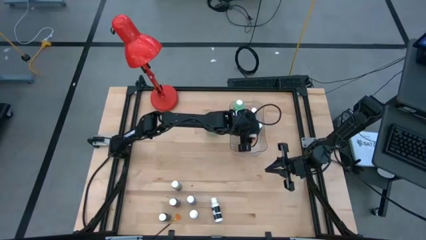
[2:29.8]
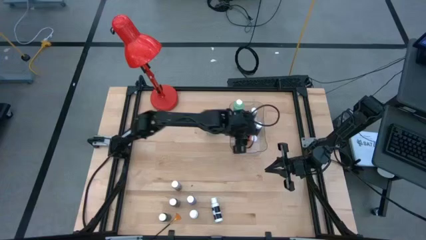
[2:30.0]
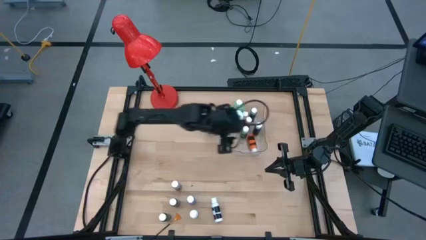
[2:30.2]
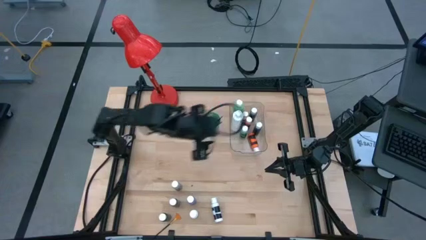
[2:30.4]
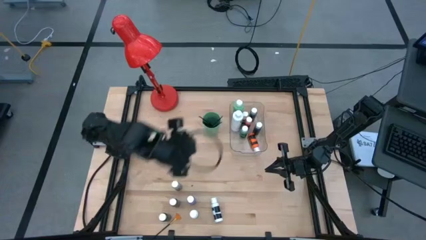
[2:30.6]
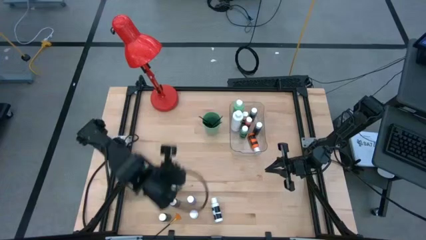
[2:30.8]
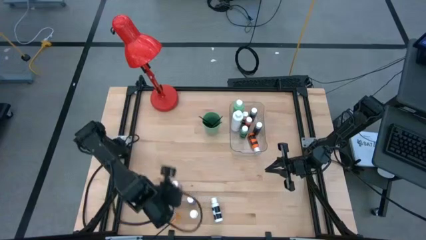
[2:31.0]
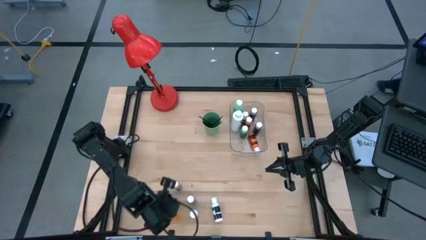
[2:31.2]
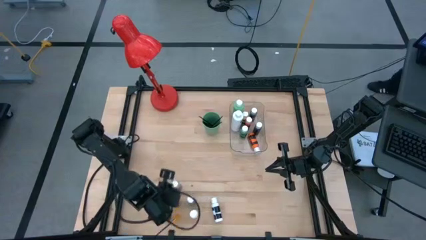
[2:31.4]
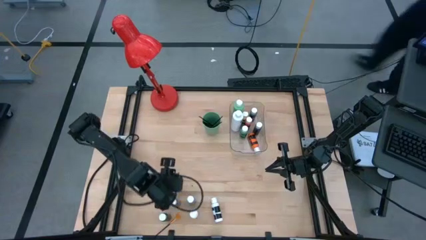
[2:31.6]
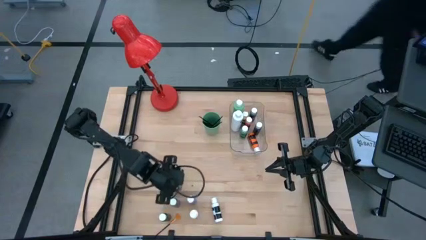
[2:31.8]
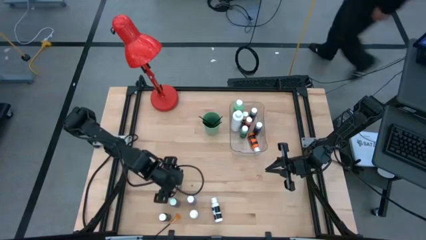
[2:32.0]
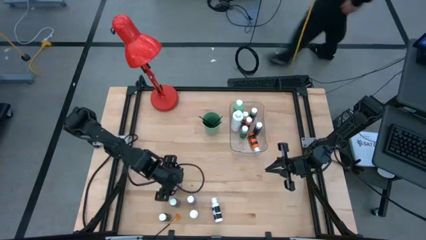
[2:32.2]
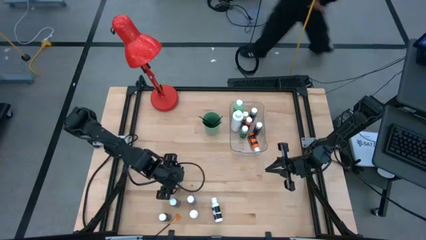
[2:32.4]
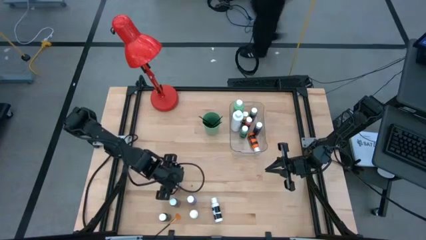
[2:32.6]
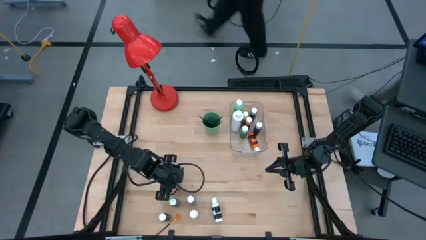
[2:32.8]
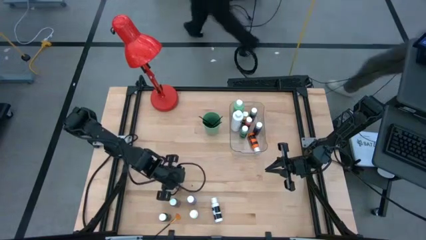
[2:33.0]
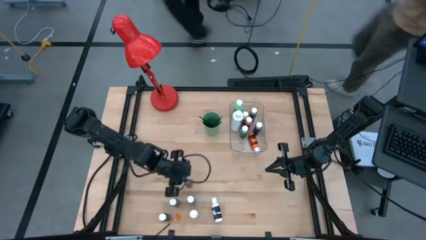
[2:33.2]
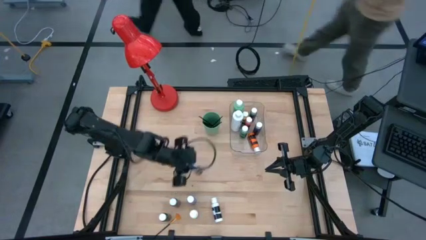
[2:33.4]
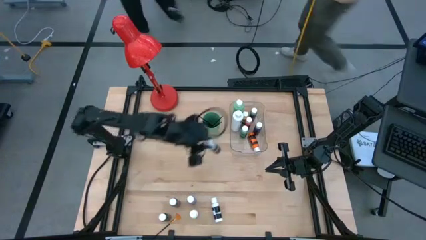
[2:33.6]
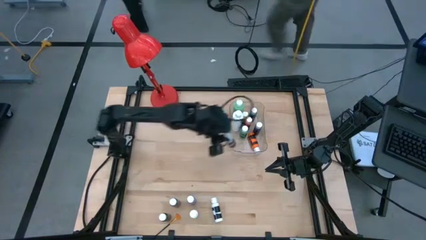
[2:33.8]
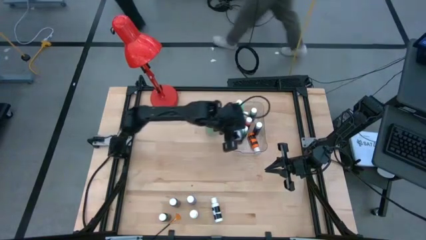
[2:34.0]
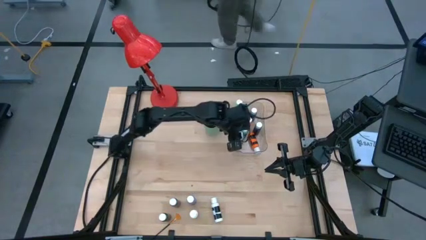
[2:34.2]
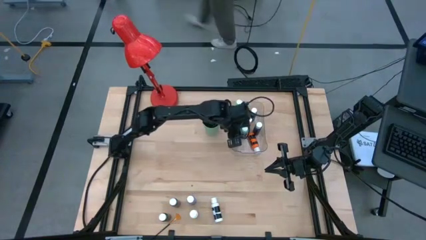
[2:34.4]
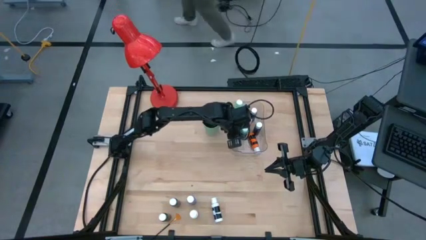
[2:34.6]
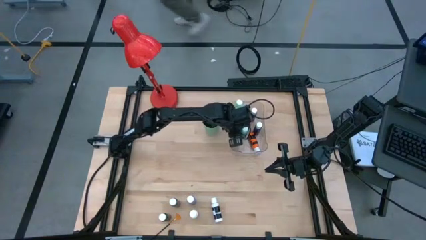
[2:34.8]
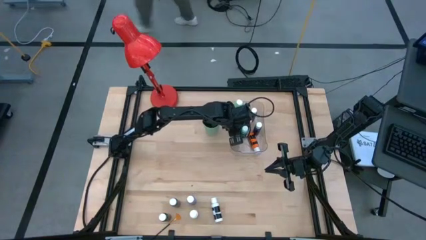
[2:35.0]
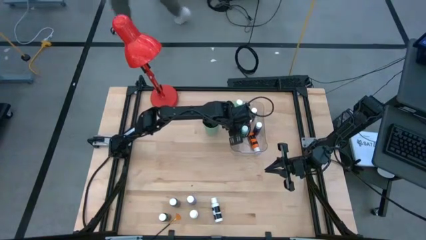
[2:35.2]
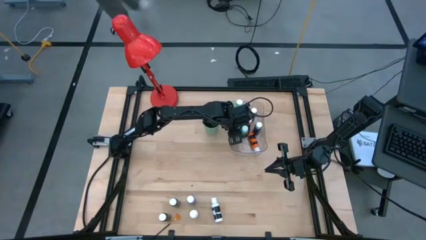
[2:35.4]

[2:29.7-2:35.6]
Task: Pick & Place Paint Supplies
Put the gray paint bottle into the transparent bin

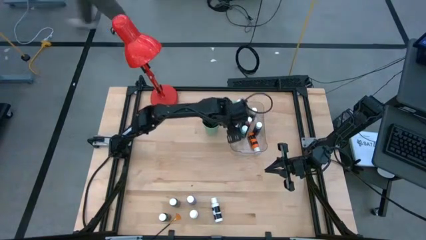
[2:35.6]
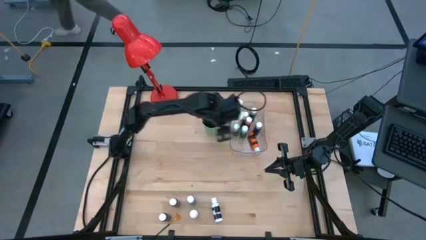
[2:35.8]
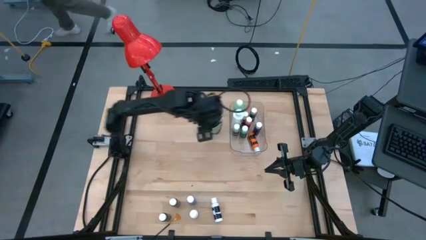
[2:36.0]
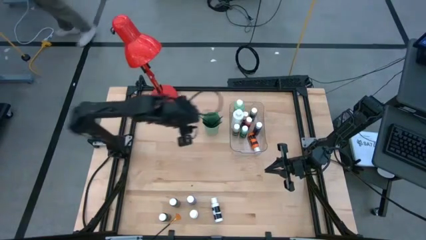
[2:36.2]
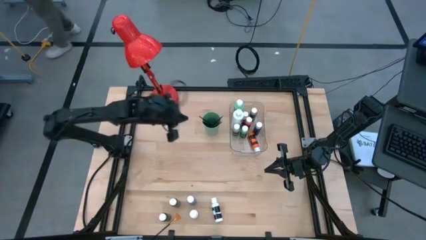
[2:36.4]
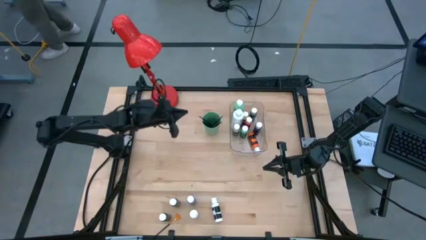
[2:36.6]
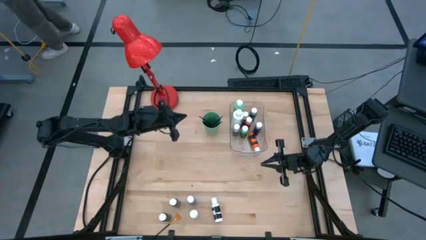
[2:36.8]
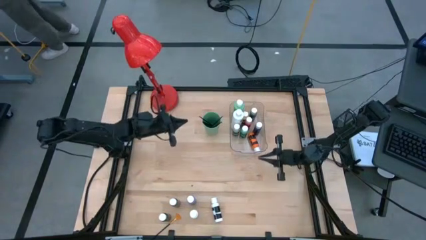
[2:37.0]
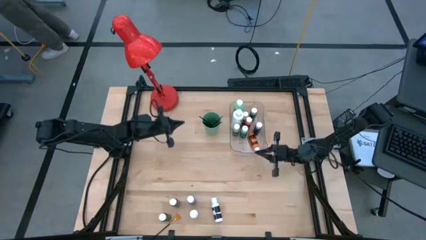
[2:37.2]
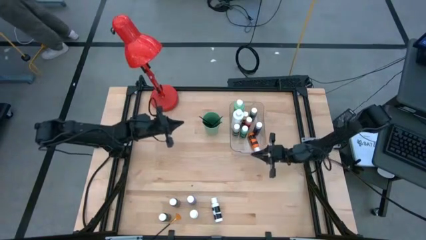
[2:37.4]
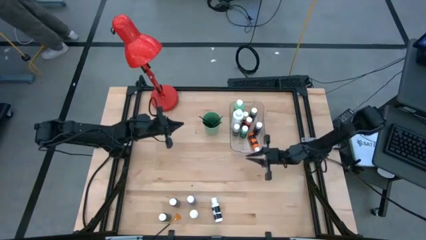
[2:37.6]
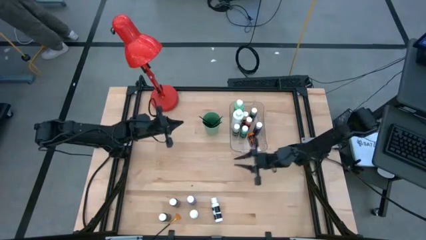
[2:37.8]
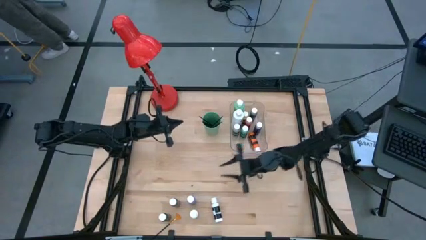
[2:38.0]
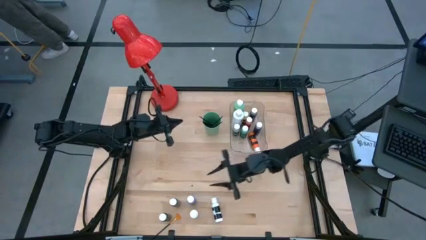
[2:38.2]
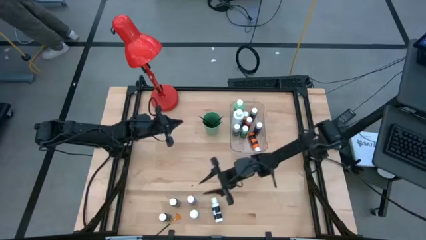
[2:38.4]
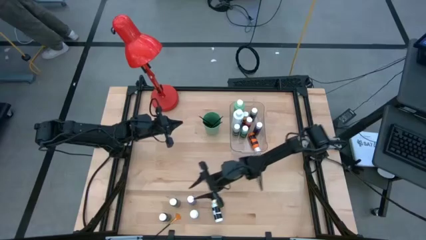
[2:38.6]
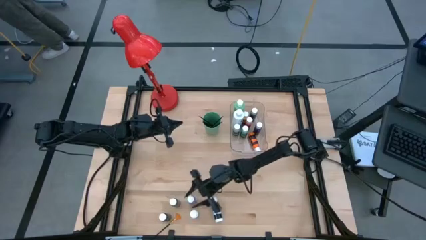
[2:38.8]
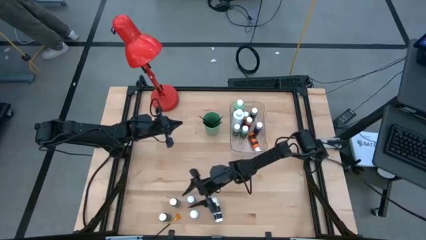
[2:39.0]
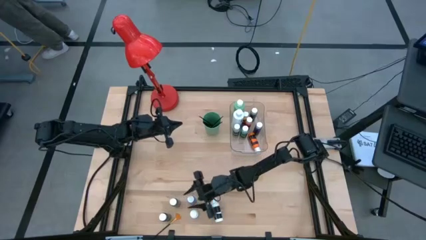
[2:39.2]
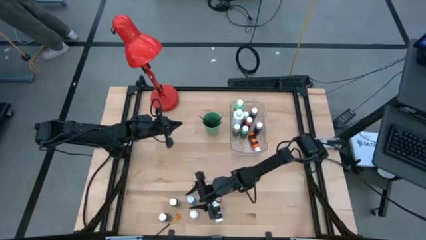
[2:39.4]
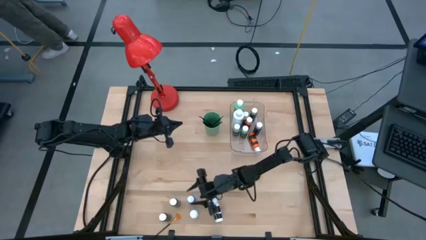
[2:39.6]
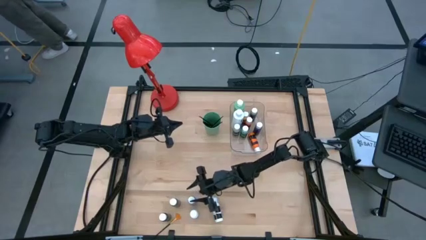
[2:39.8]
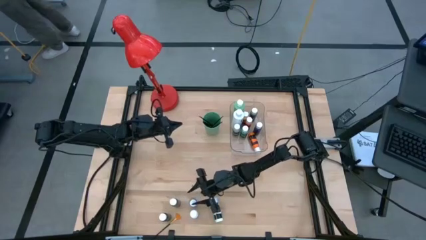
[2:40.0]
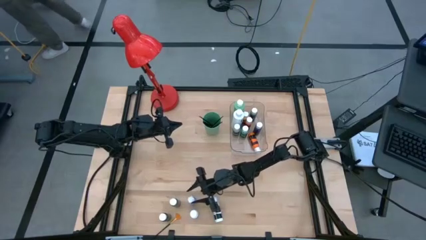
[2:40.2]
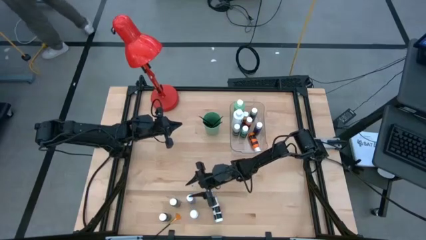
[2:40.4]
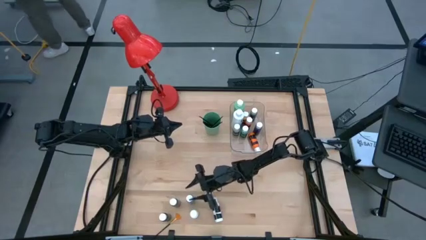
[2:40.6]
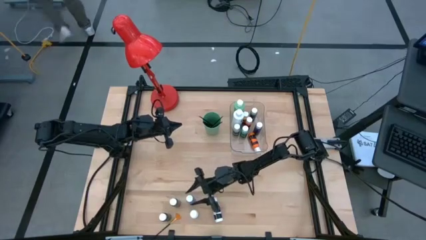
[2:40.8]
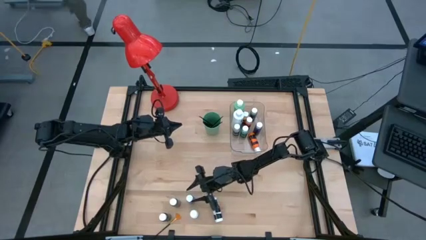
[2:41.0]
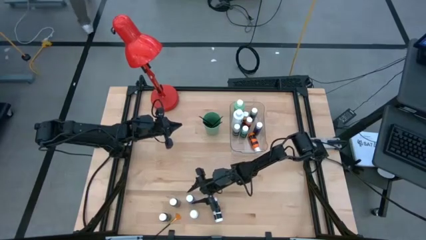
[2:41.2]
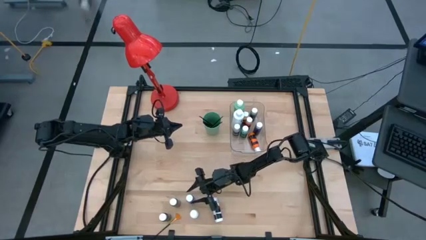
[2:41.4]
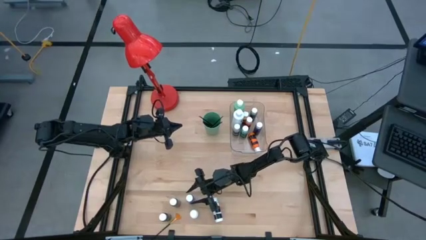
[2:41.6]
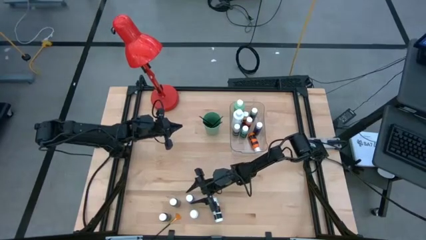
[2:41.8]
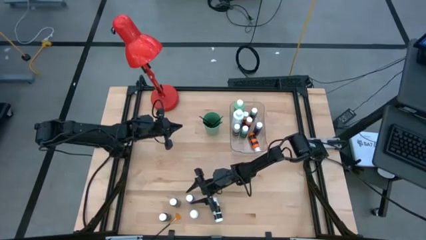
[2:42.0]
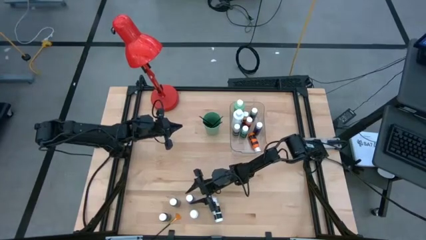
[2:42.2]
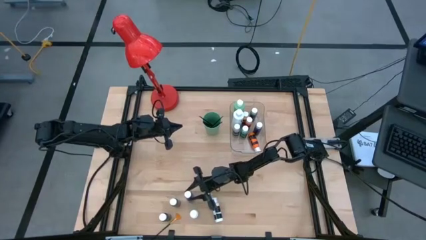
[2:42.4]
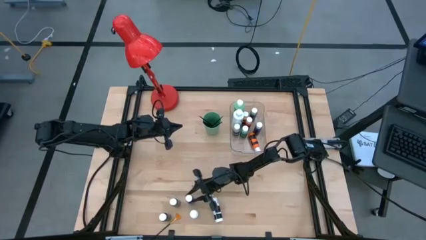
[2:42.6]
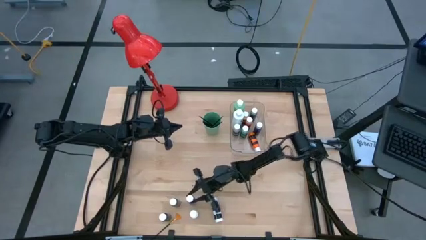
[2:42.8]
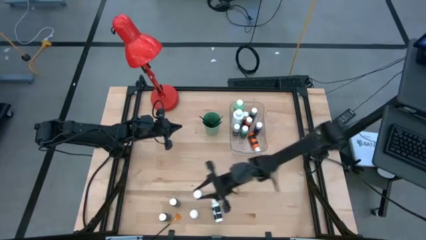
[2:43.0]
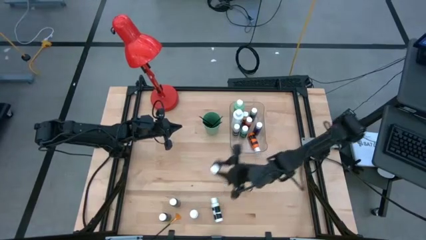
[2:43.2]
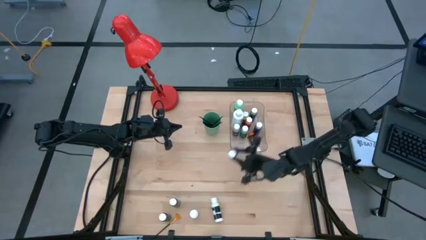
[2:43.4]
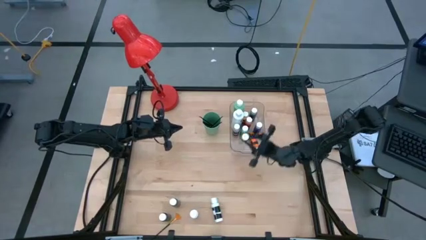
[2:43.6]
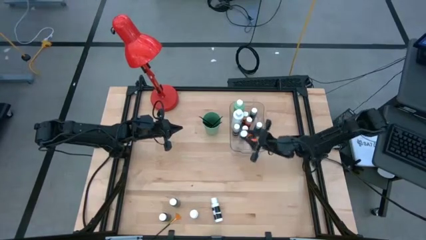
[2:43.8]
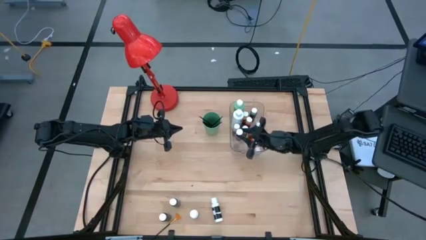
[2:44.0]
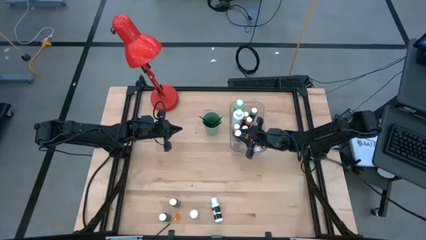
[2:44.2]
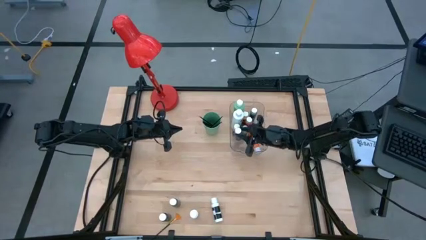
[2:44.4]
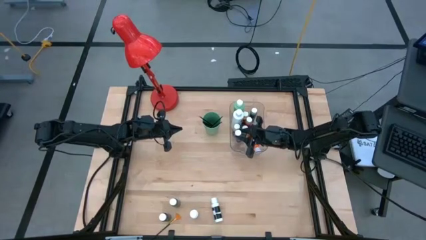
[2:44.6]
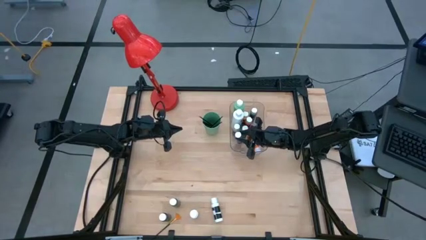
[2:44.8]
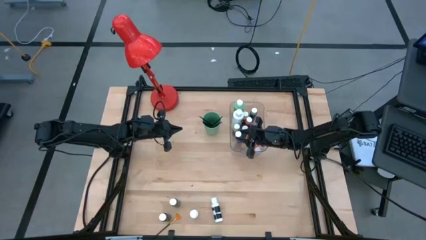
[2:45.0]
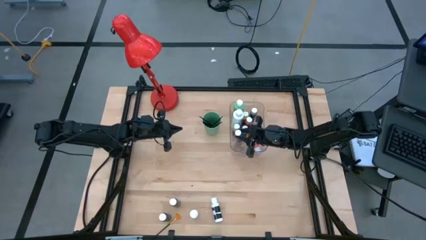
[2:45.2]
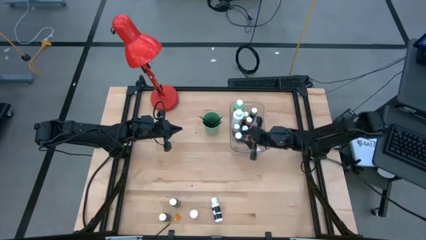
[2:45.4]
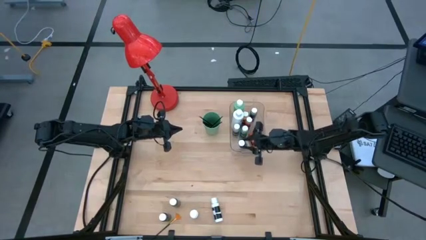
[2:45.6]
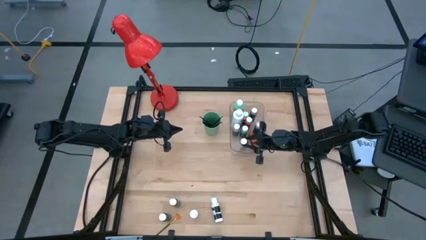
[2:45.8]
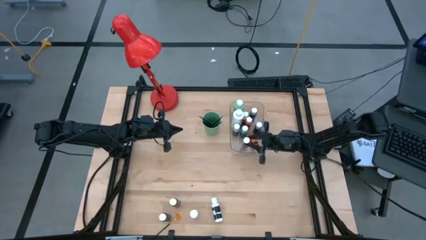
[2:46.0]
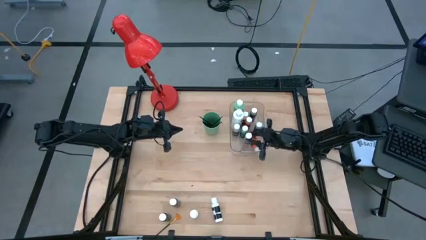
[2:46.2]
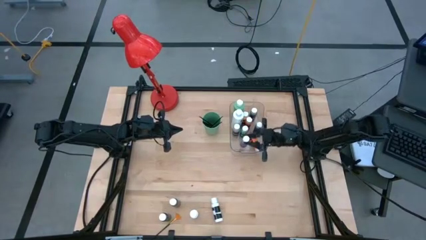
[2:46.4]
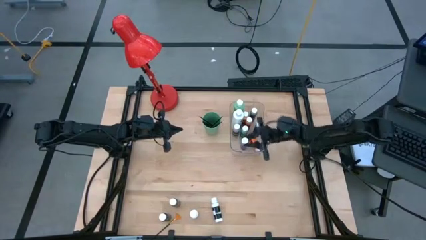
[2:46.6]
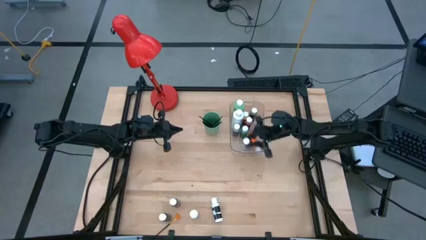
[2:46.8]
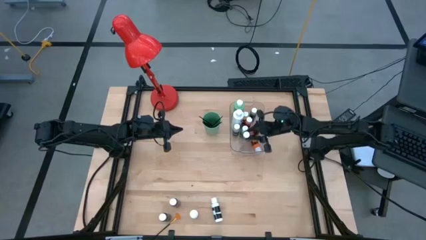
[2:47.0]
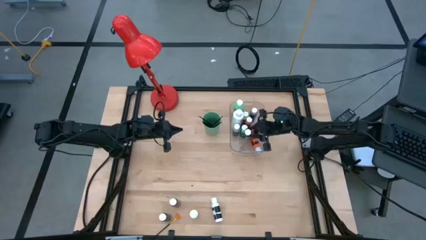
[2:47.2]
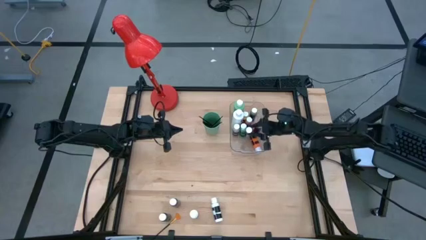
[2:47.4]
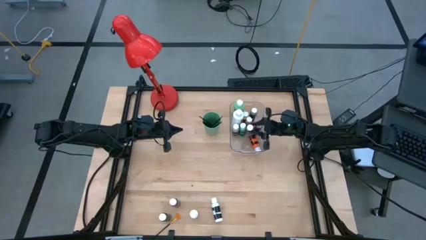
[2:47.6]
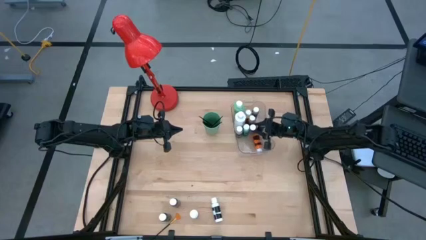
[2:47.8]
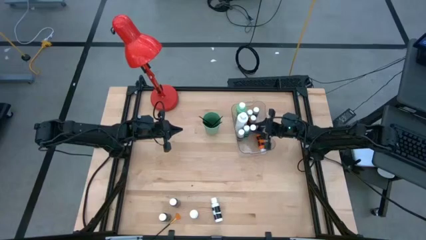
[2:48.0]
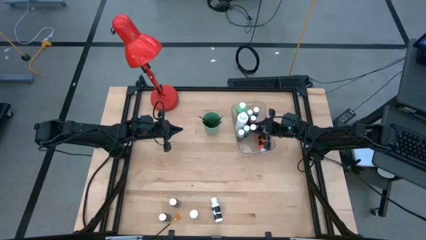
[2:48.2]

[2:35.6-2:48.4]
Put the purple paint bottle into the transparent bin
